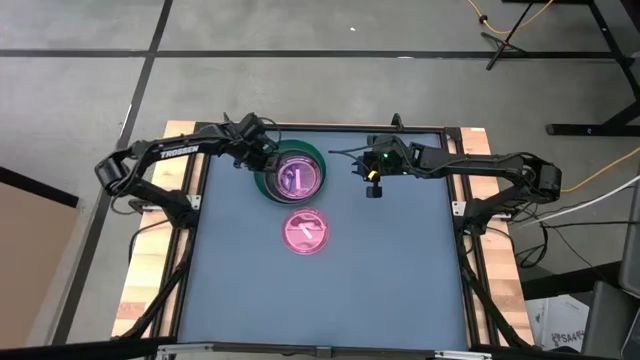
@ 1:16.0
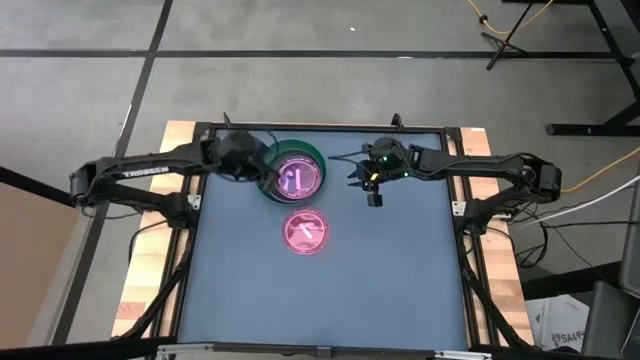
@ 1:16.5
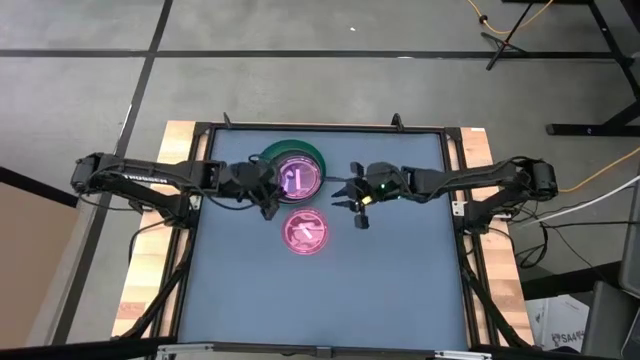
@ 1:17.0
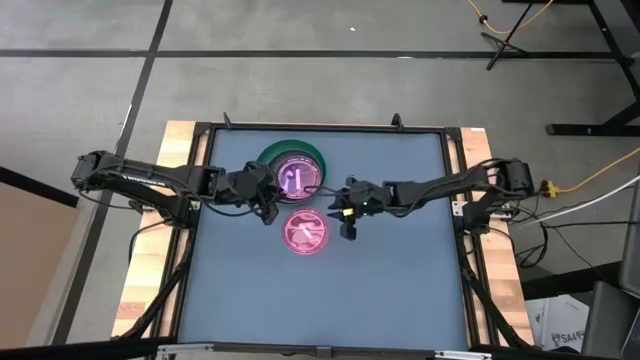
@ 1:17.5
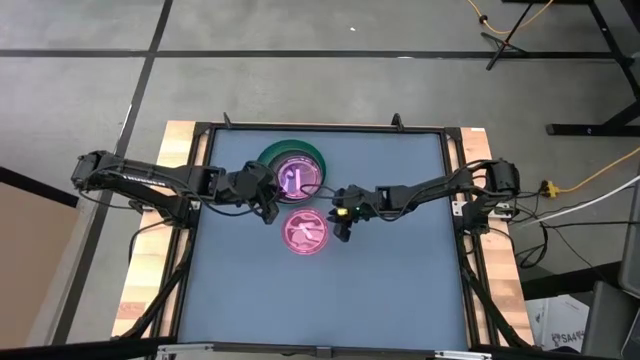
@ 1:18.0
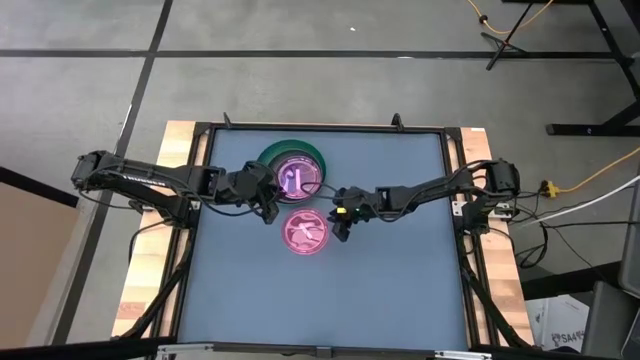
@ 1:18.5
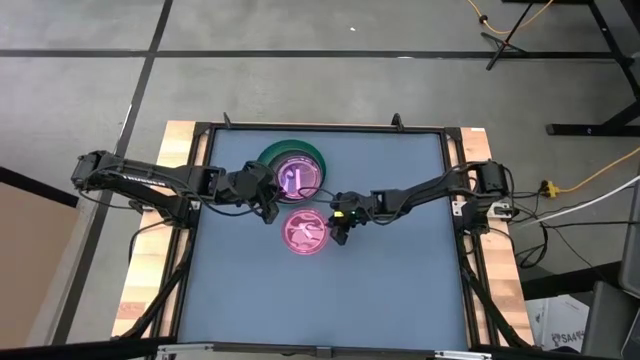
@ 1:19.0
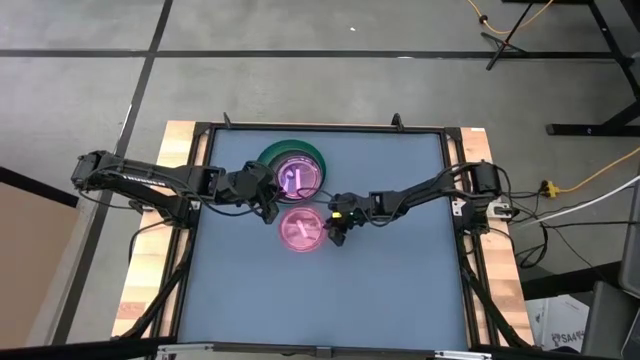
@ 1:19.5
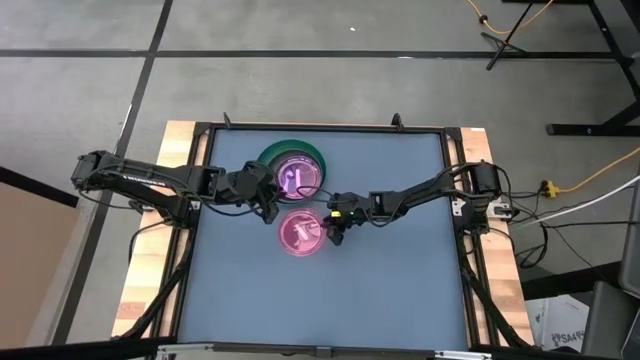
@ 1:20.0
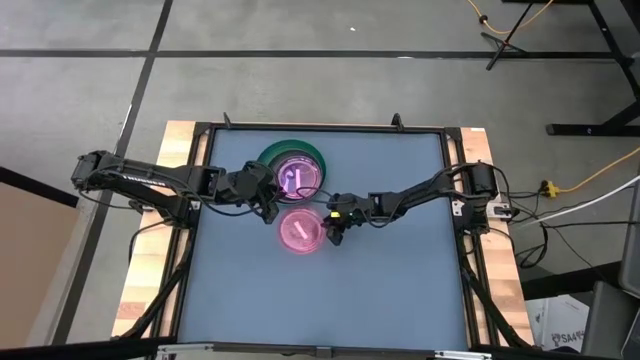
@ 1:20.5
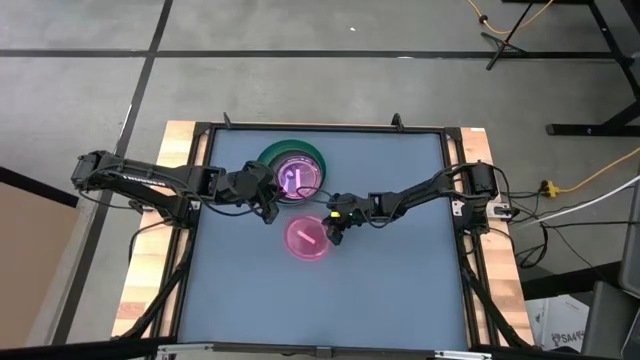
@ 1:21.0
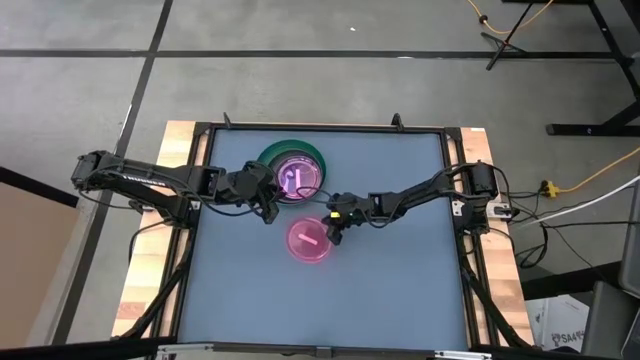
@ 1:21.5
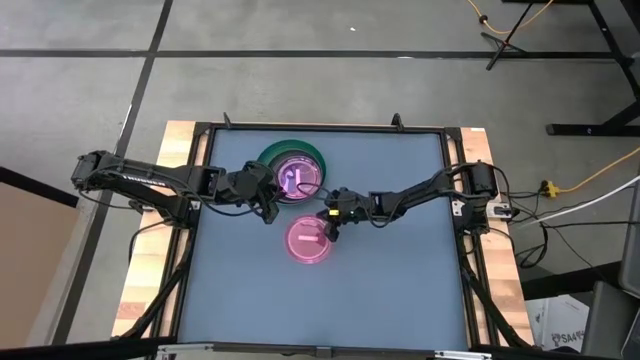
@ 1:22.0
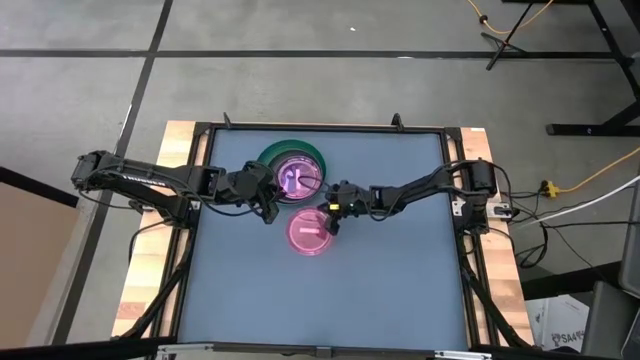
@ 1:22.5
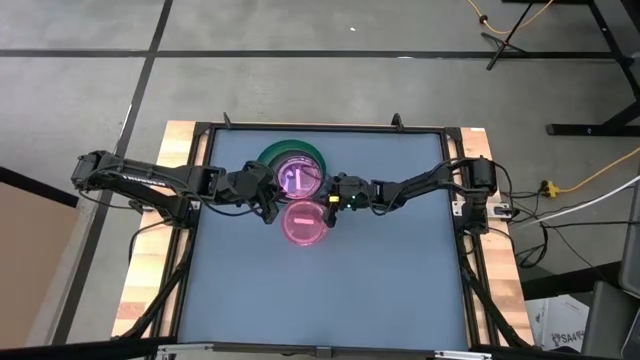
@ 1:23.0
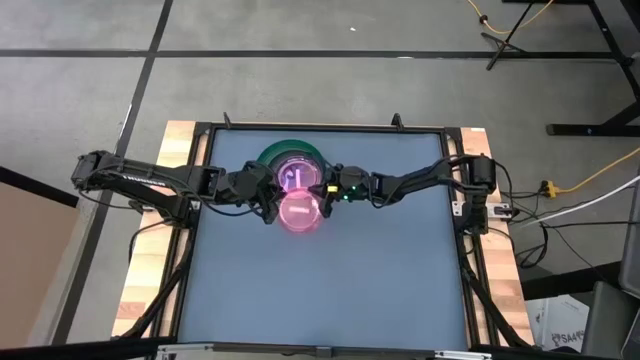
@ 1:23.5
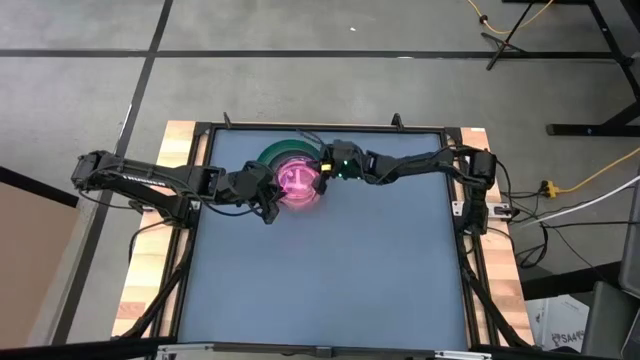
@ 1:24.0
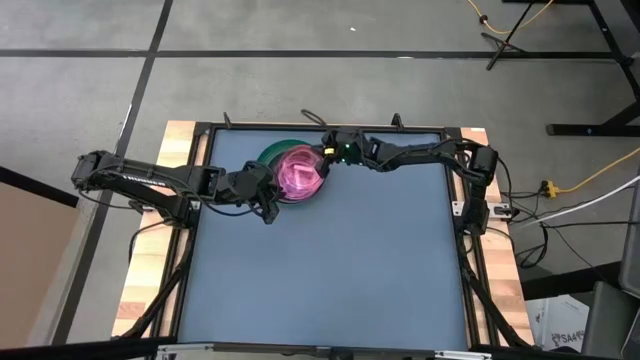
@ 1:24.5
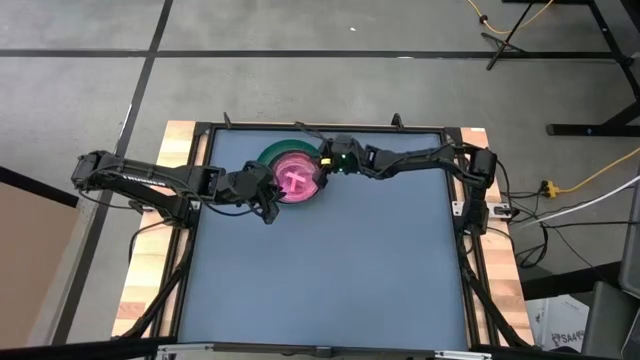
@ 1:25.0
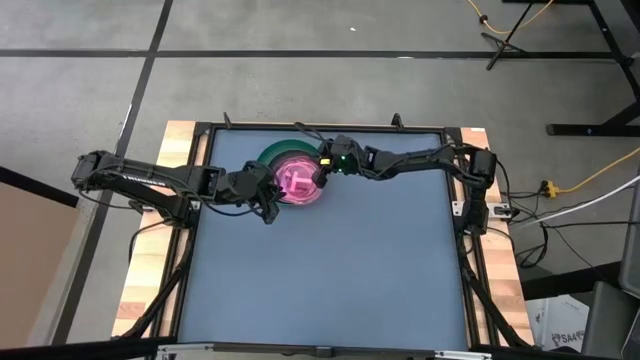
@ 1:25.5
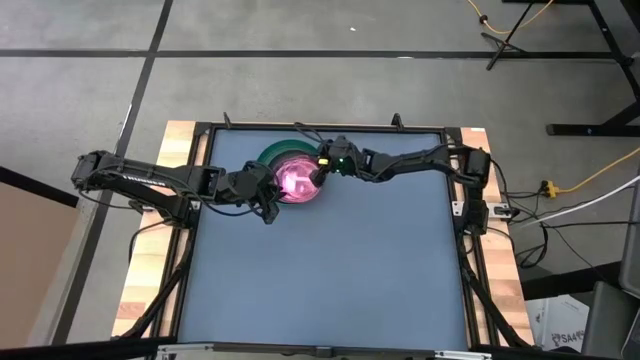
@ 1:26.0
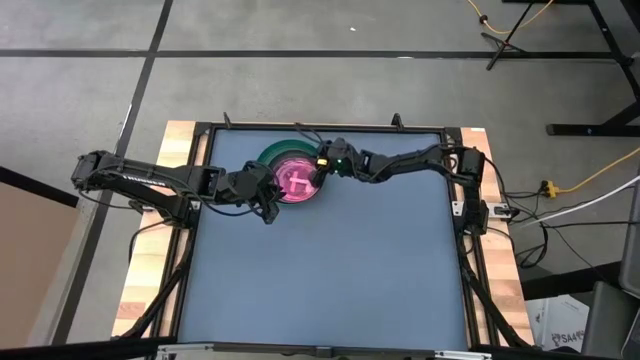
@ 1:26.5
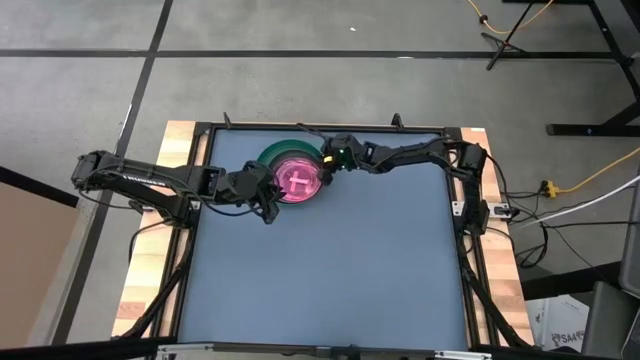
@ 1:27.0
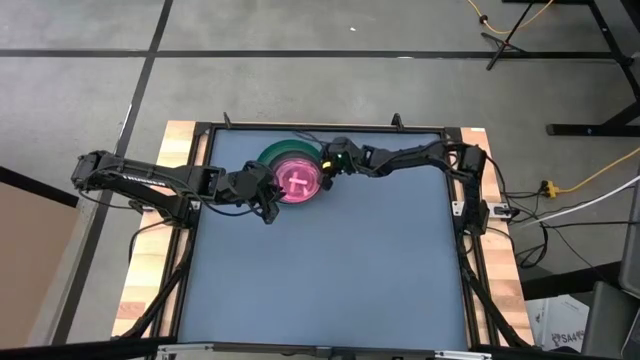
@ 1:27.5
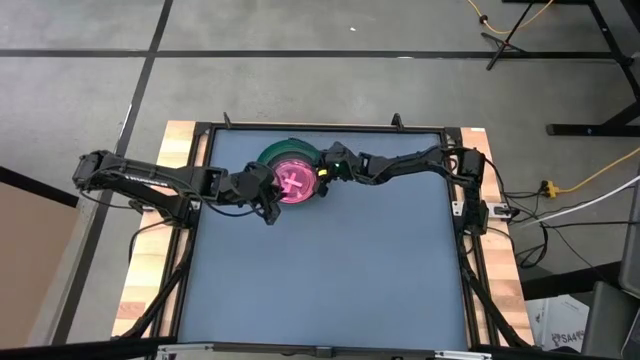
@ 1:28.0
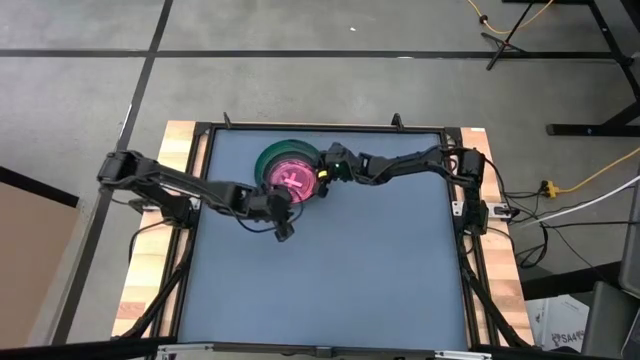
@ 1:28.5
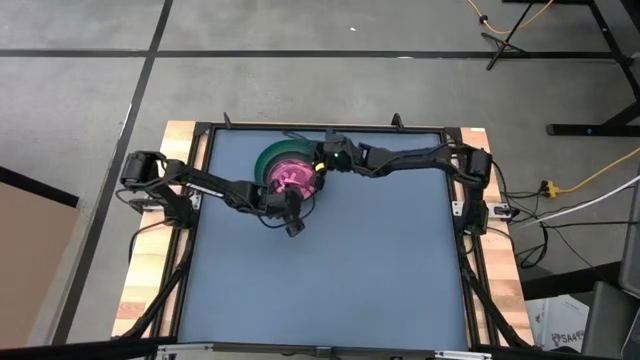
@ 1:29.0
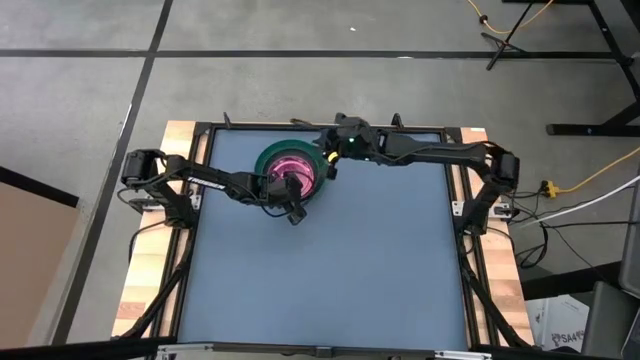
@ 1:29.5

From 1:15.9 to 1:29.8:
Task: Stack plastic plates
Stack the pink plate on the other pink plate

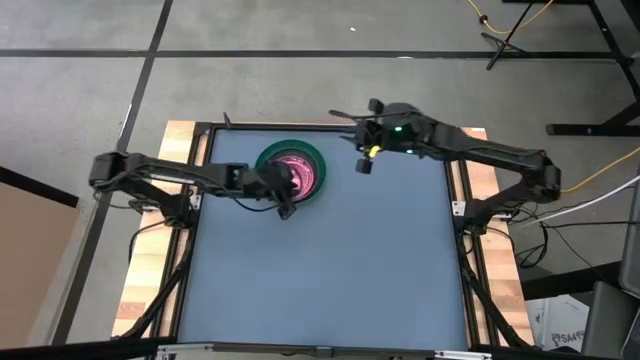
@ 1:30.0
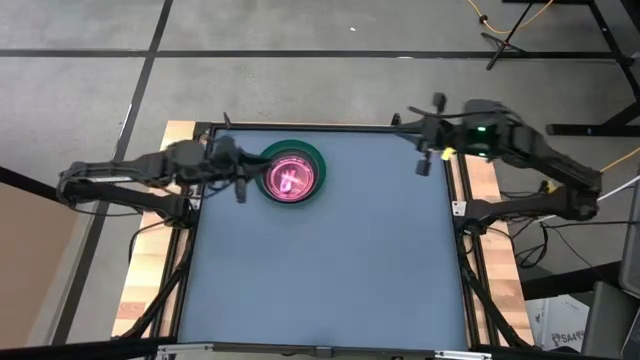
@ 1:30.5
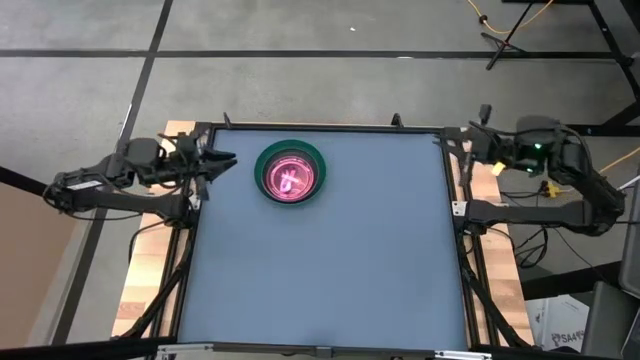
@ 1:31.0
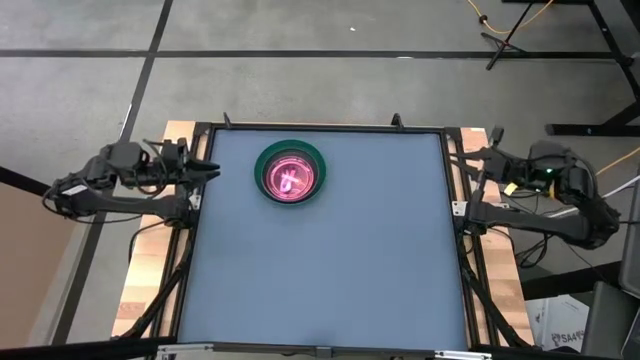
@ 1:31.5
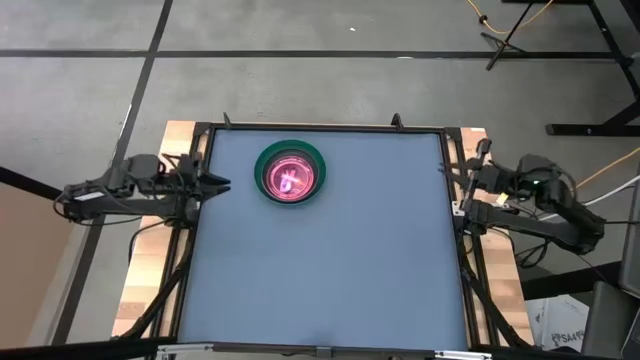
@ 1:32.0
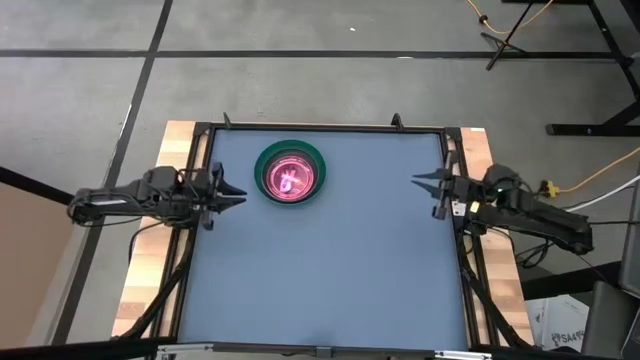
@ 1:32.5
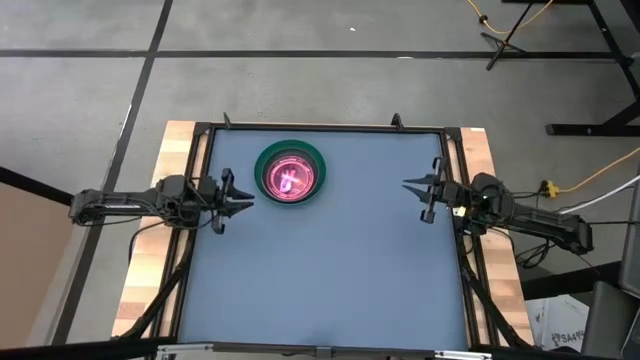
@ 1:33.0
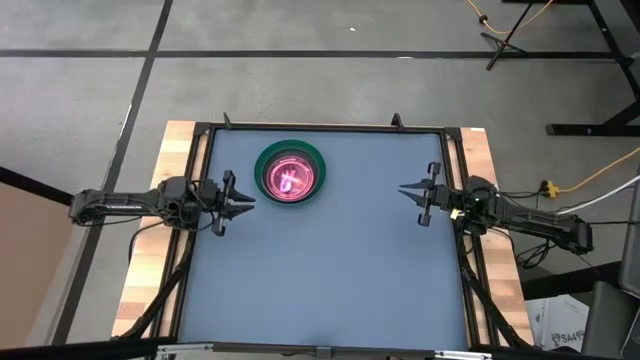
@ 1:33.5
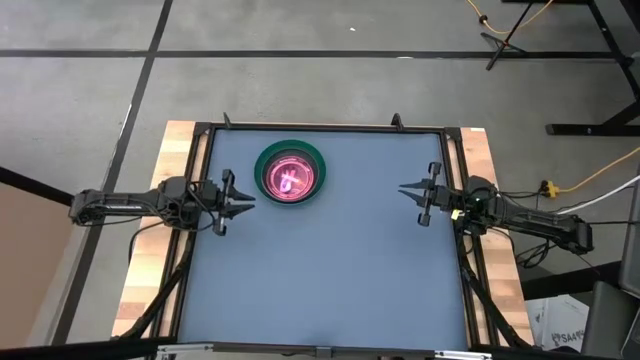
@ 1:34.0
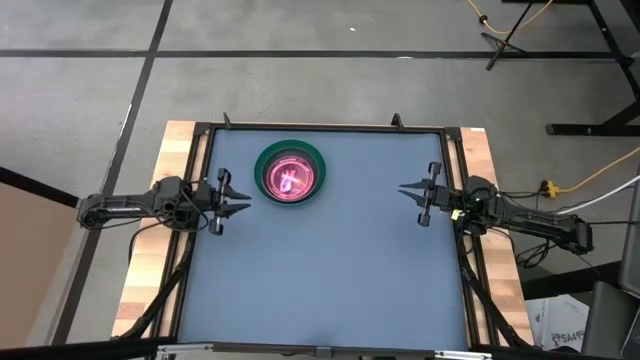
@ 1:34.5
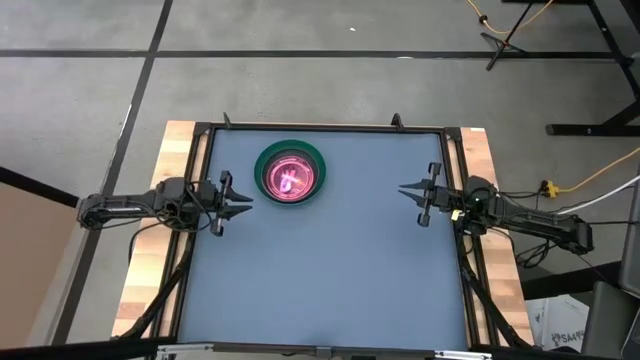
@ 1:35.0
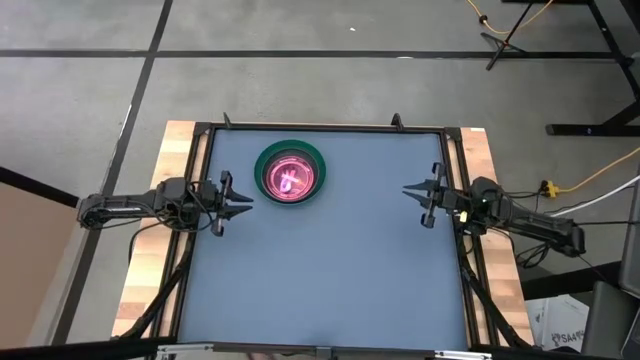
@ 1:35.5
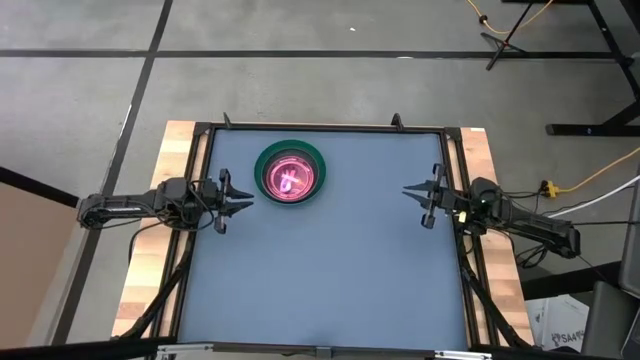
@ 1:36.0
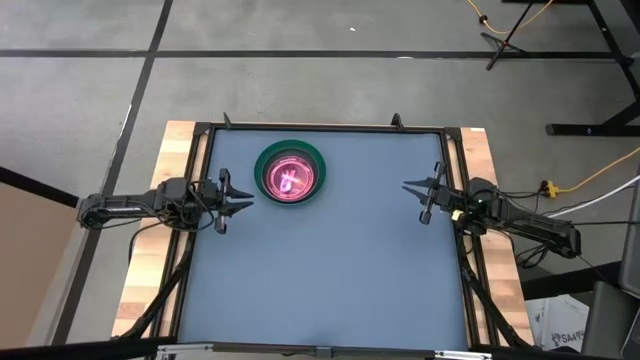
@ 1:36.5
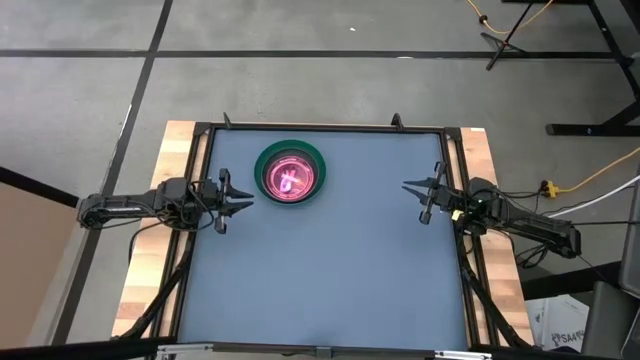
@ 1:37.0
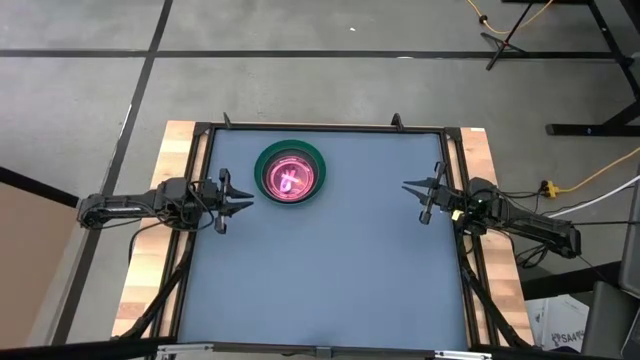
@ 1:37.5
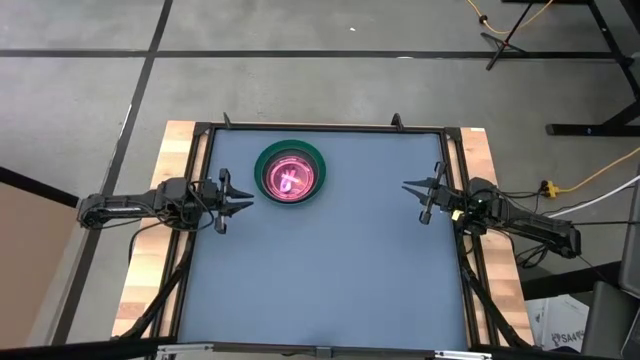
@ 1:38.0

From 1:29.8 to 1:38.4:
Return to Home Position
